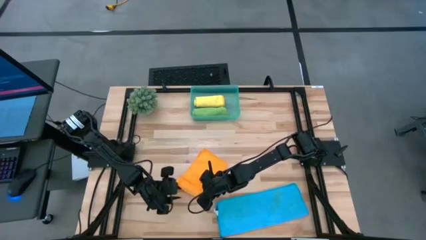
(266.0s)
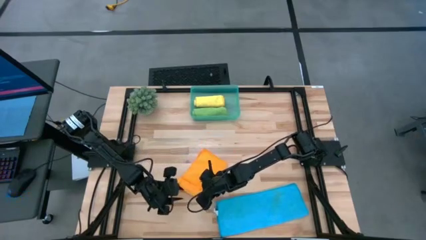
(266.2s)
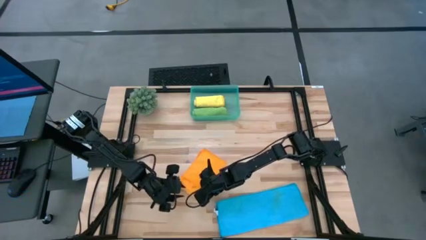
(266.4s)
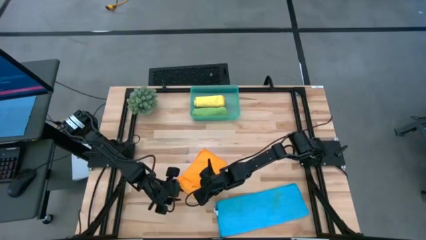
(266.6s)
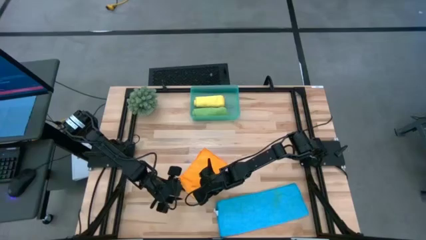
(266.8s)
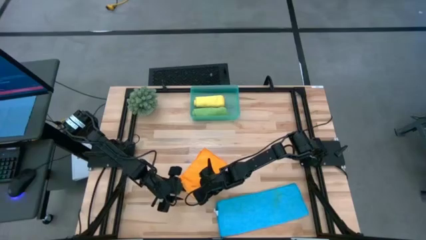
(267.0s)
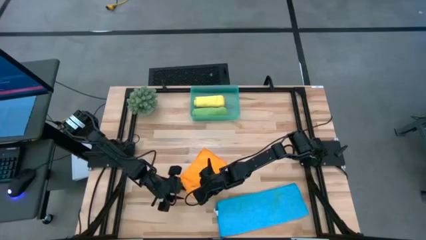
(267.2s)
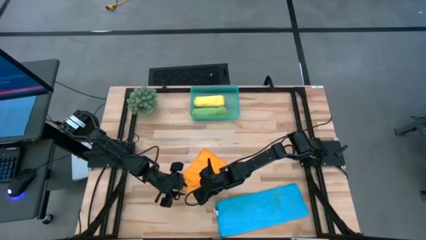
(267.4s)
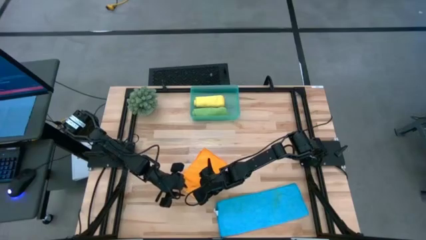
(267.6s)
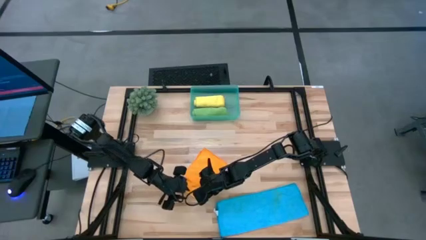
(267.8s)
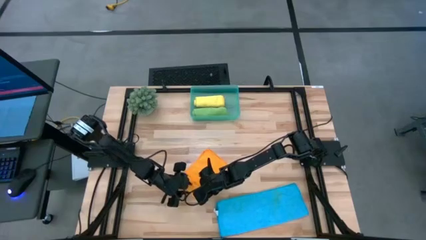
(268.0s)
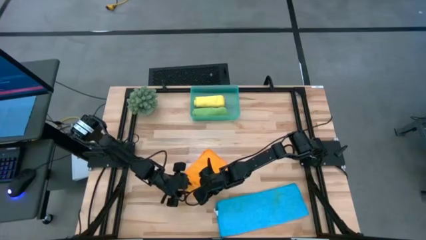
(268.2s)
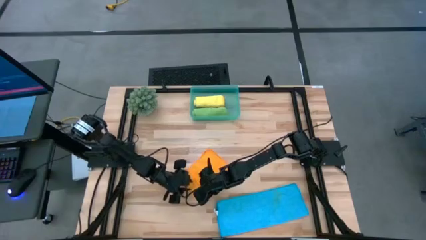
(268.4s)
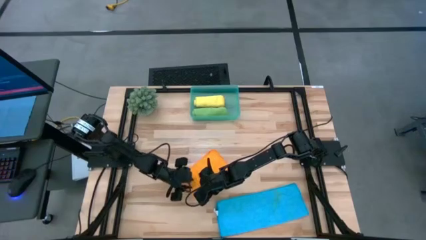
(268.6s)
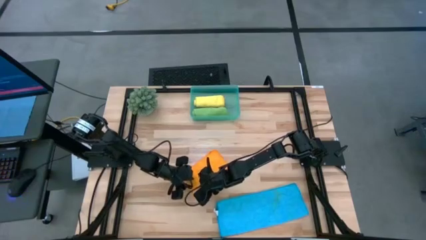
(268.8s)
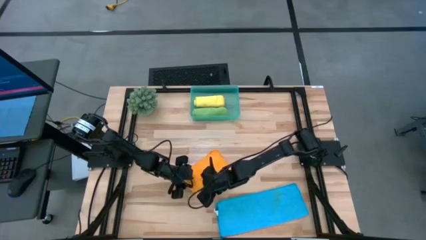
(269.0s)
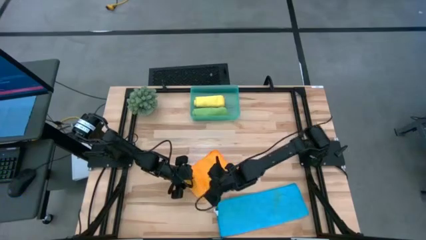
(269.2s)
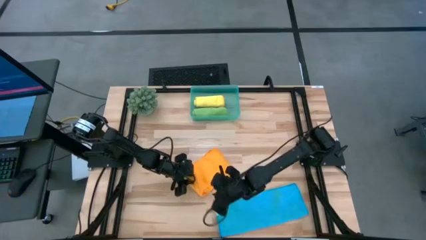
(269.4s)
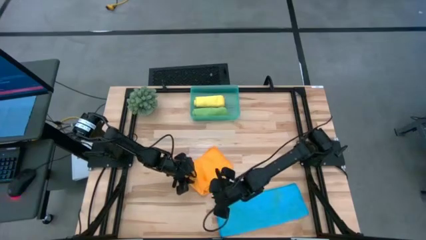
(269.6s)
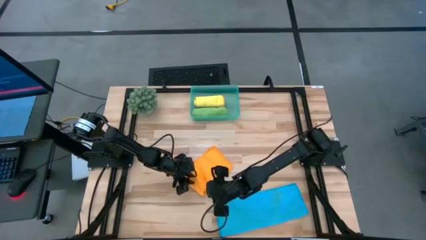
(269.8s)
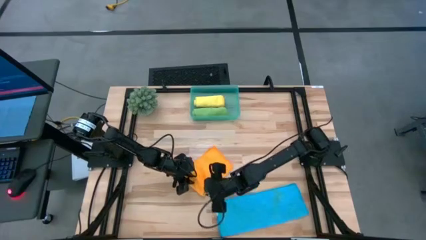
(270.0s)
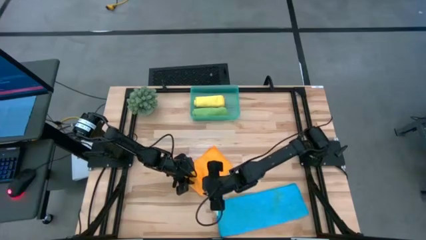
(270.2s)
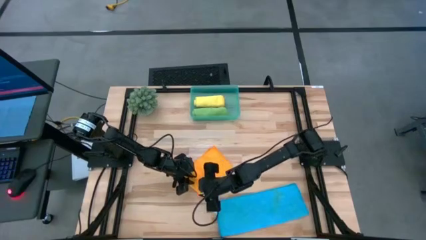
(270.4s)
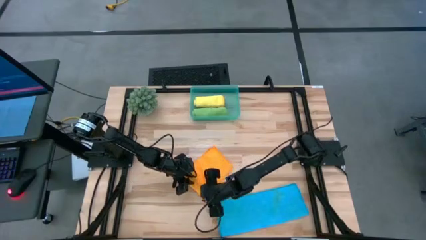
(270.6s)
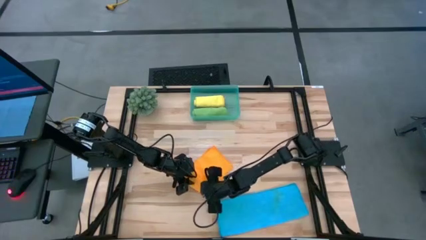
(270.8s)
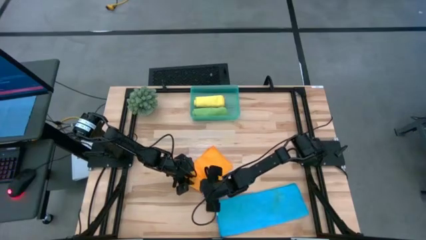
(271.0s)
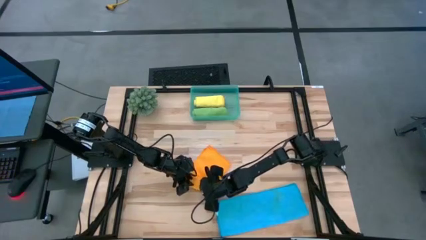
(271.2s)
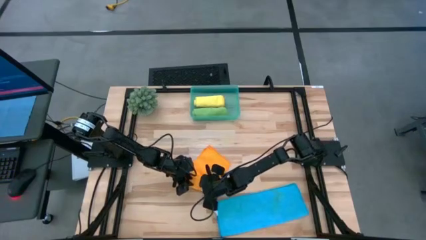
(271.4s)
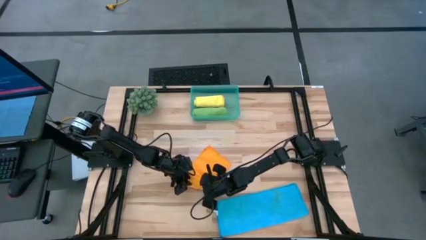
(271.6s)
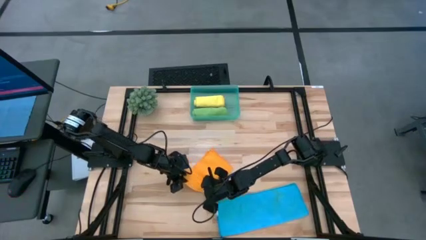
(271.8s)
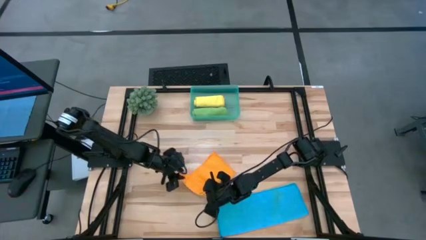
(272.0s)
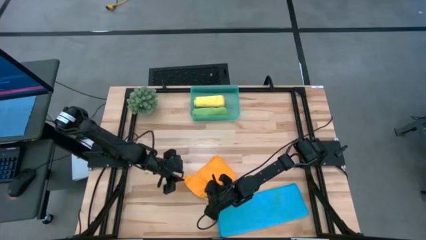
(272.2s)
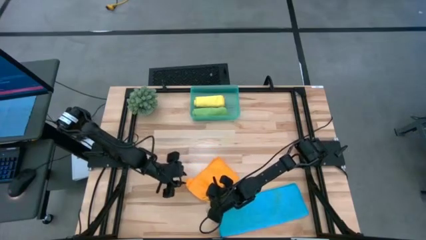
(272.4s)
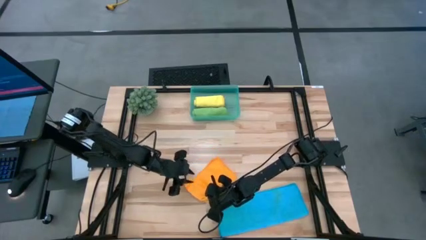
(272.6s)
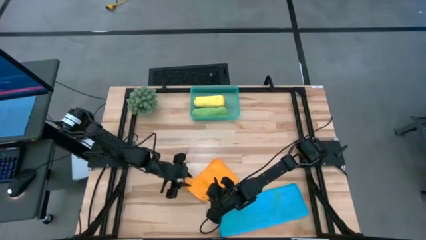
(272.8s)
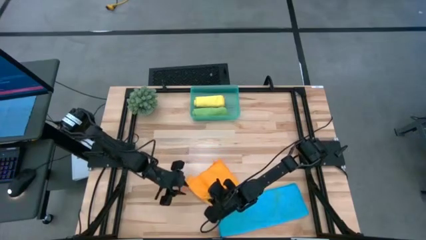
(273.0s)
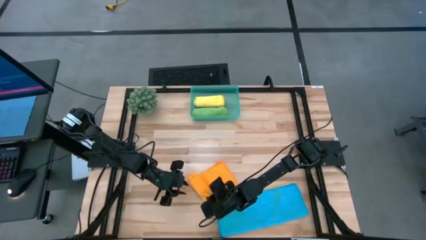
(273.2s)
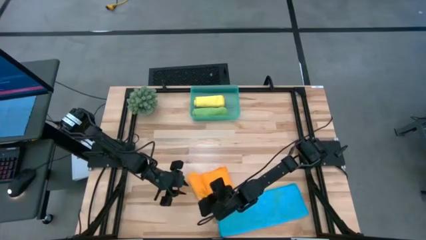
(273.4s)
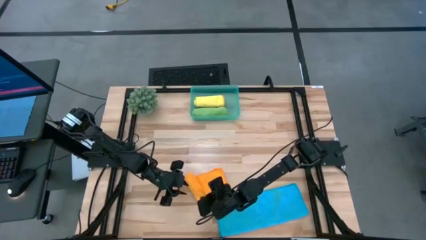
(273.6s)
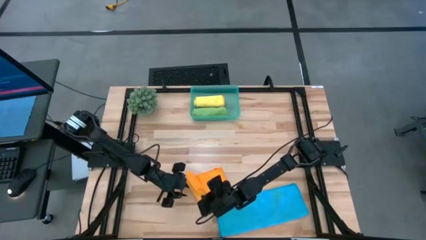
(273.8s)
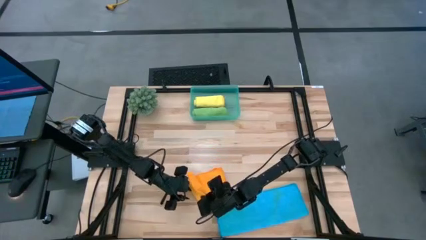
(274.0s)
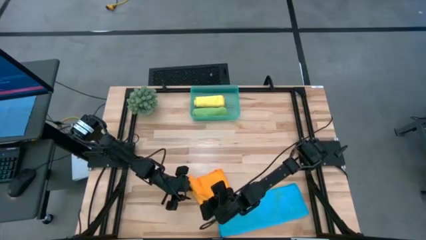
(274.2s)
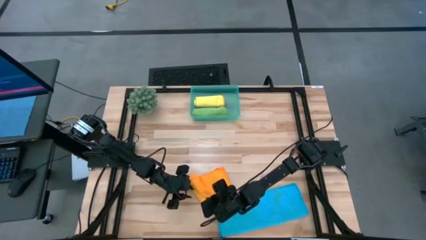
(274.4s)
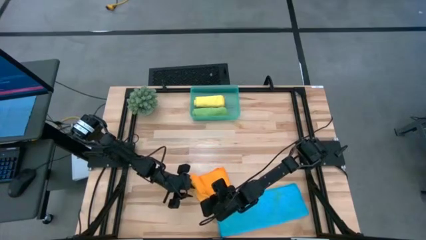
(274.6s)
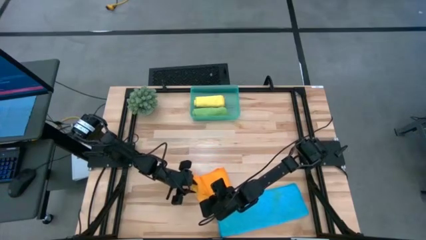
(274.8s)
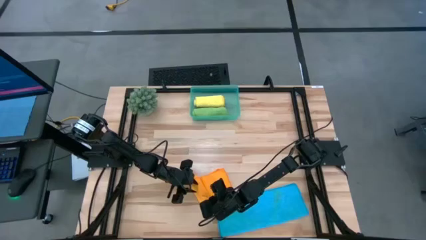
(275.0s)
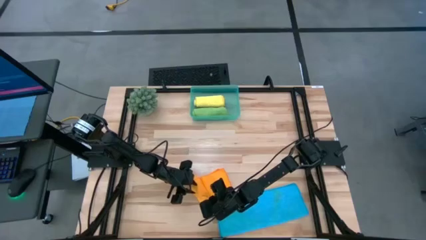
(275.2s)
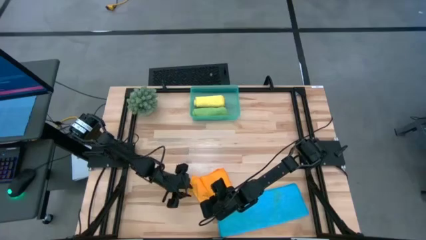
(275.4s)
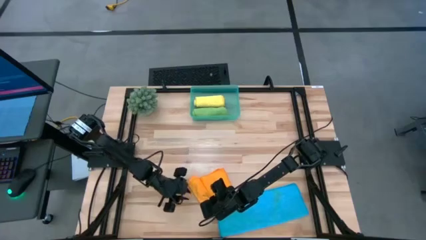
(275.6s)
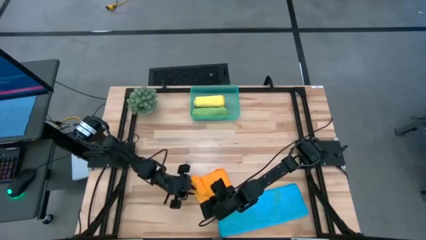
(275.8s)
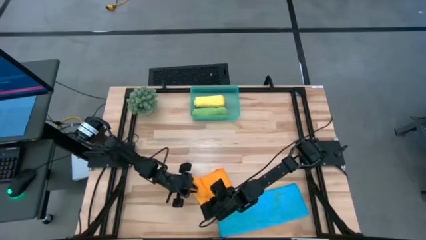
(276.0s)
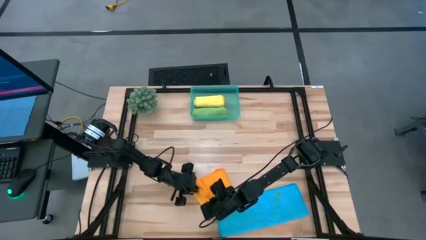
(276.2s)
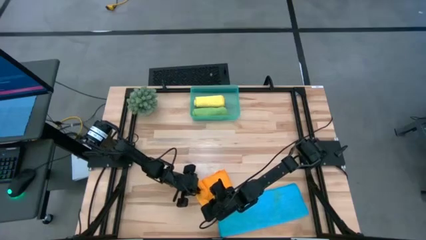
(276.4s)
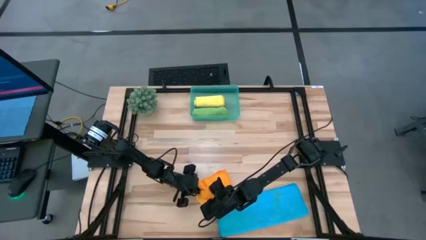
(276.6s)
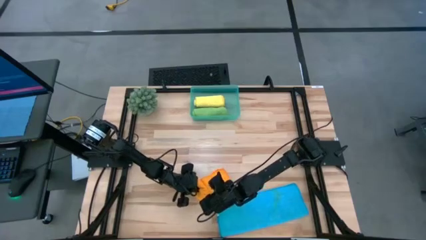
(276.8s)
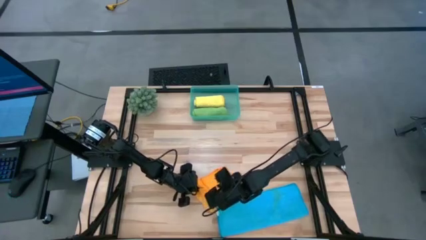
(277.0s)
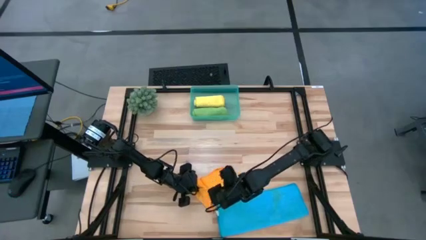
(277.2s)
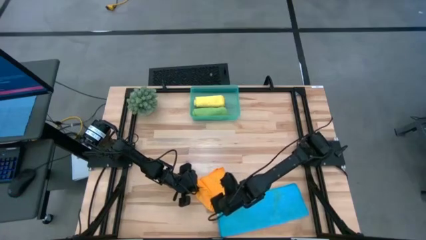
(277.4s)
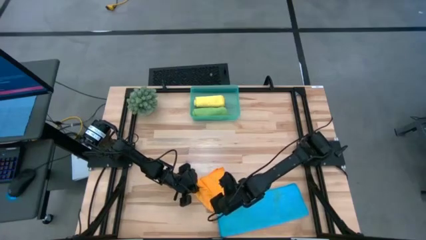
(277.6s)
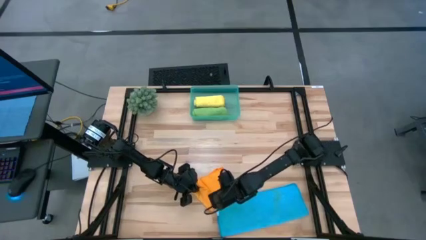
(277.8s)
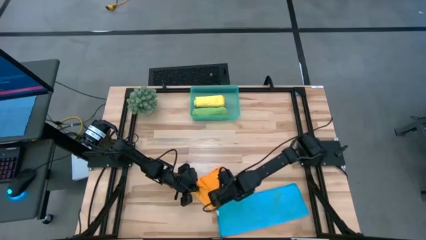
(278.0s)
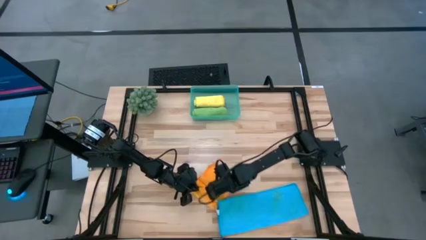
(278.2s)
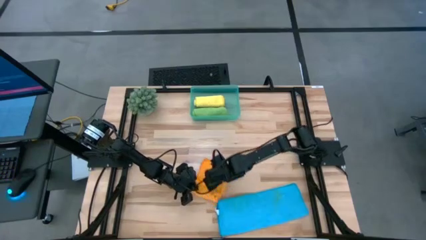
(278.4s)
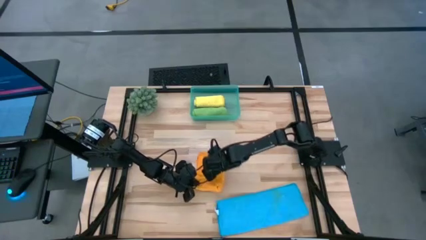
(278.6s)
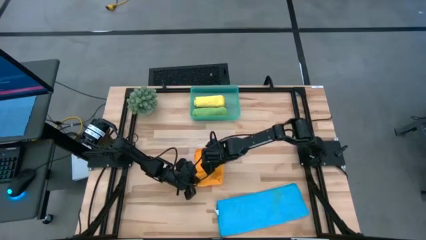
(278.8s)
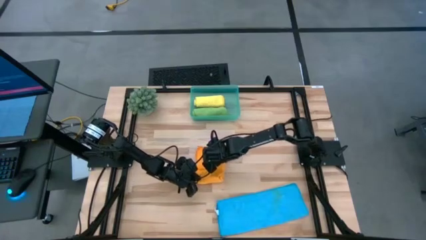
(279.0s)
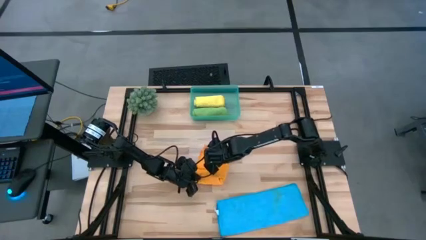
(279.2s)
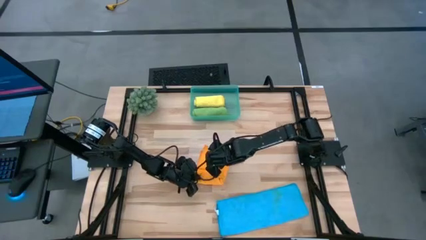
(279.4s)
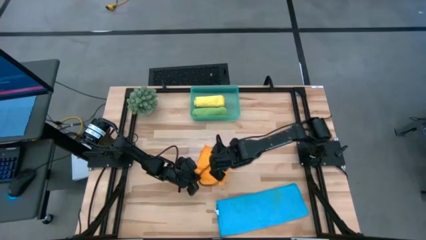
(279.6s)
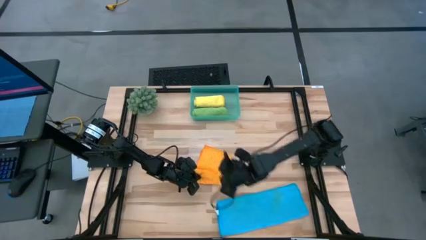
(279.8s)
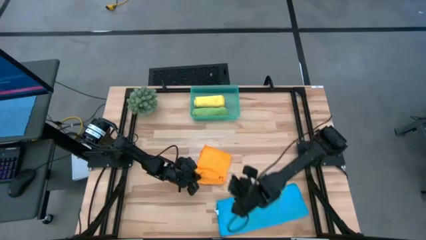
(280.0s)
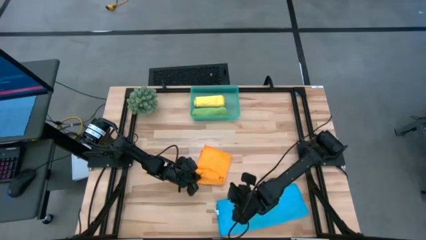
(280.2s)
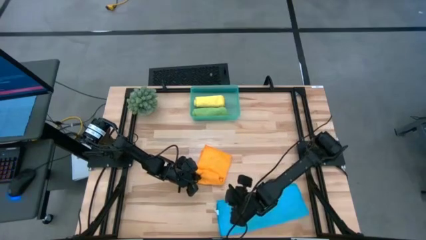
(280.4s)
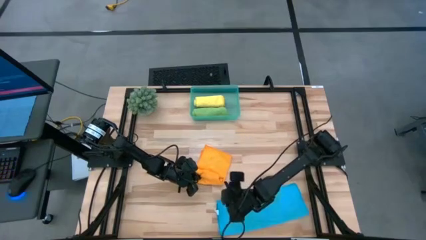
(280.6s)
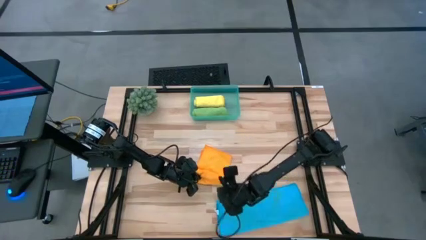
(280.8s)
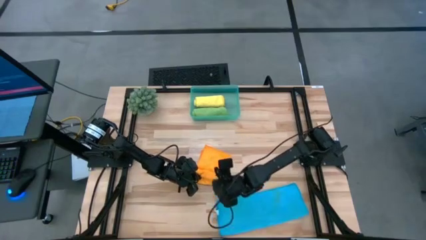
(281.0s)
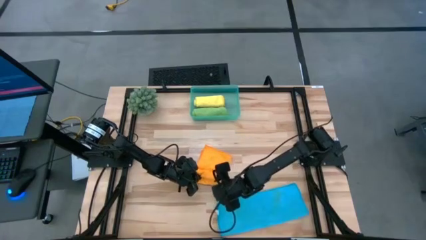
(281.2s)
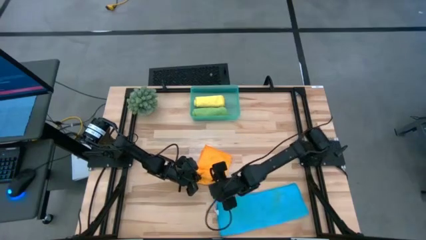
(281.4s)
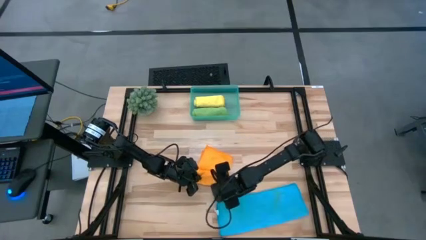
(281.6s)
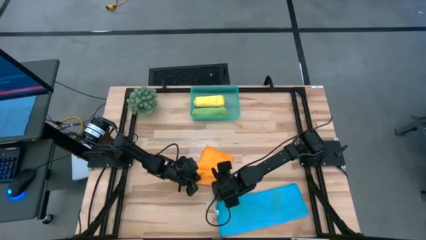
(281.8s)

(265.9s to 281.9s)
Task: Roll microfiber towels into tight, uniform cylinder then place into a basket
Roll the orange towel
